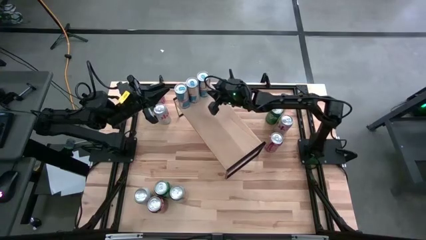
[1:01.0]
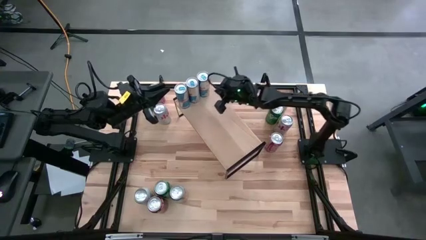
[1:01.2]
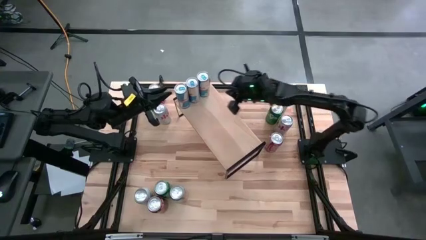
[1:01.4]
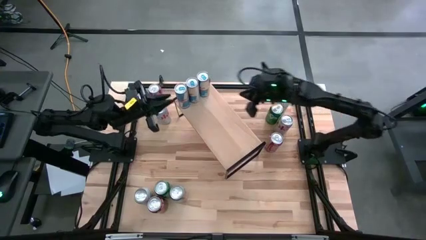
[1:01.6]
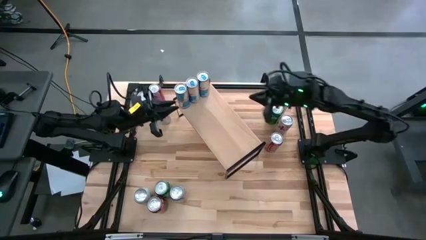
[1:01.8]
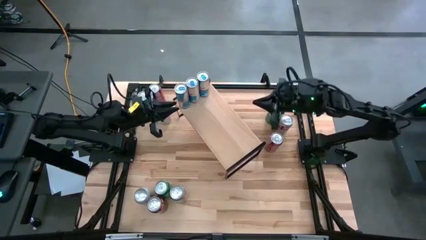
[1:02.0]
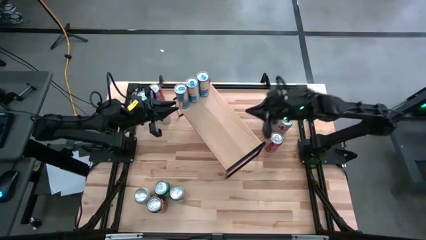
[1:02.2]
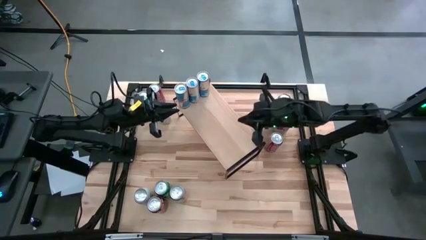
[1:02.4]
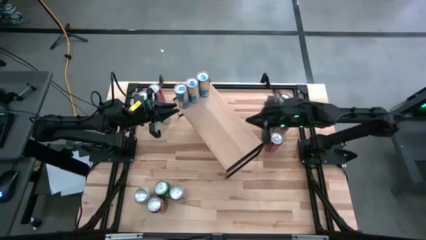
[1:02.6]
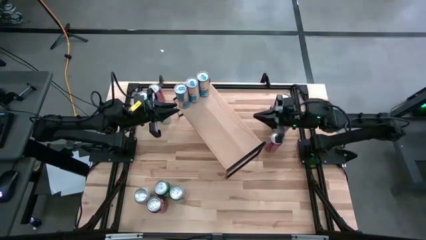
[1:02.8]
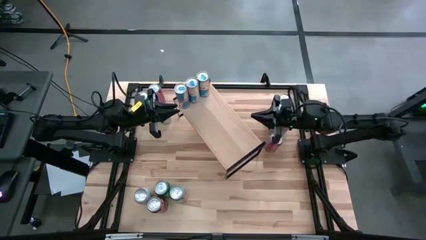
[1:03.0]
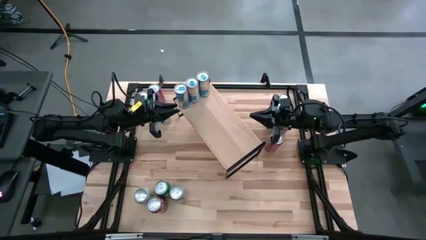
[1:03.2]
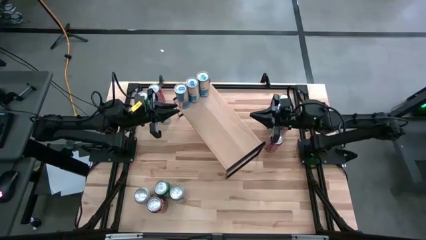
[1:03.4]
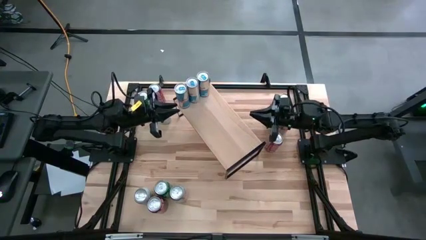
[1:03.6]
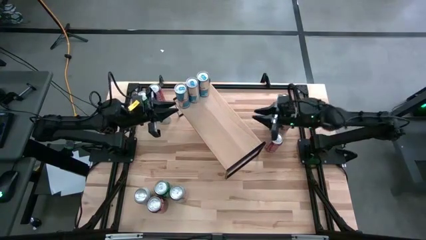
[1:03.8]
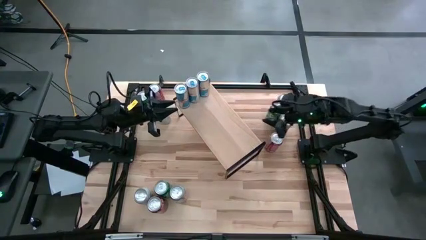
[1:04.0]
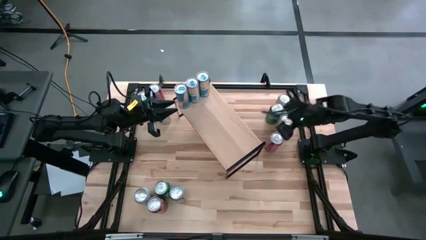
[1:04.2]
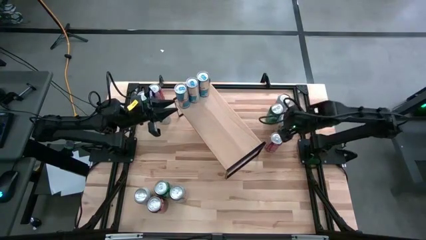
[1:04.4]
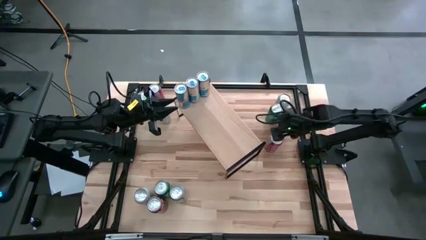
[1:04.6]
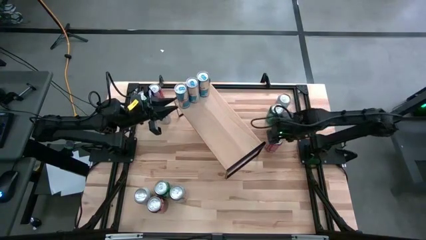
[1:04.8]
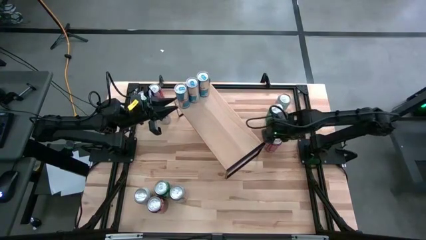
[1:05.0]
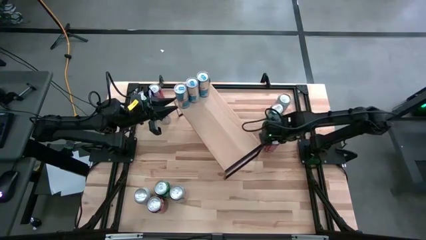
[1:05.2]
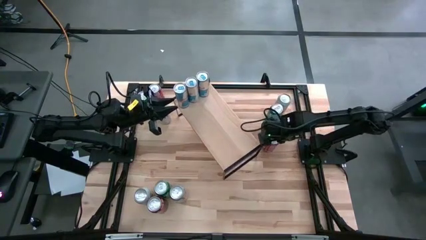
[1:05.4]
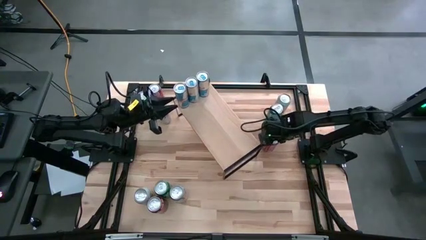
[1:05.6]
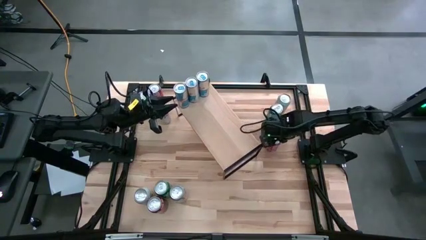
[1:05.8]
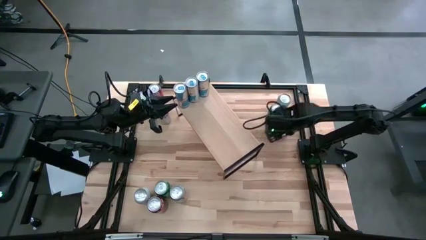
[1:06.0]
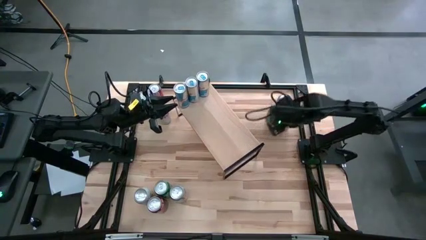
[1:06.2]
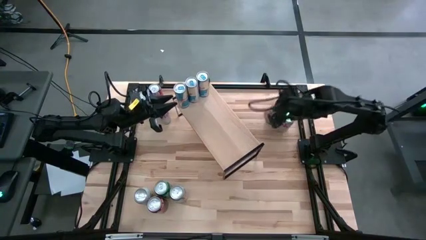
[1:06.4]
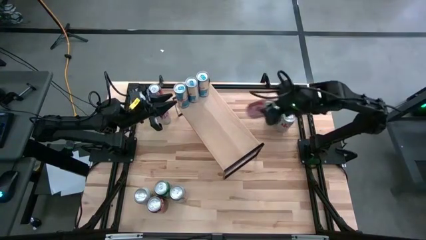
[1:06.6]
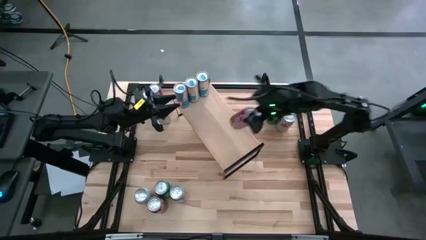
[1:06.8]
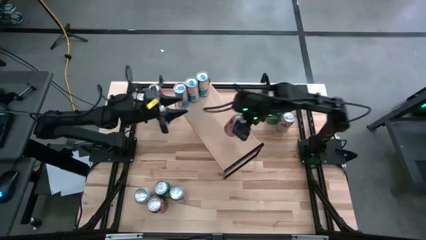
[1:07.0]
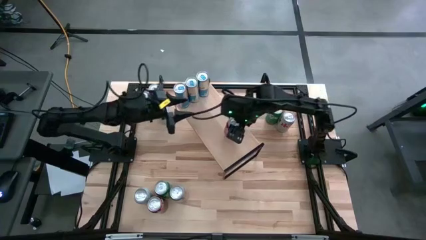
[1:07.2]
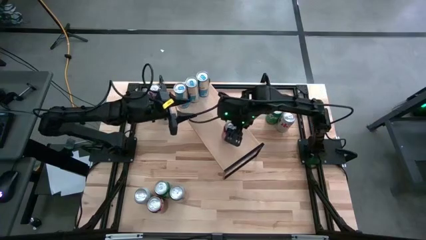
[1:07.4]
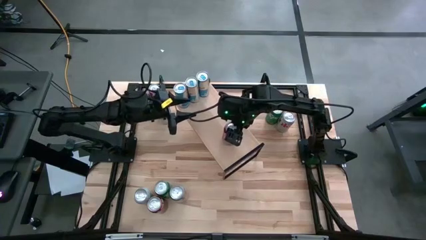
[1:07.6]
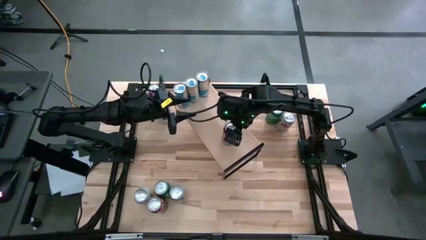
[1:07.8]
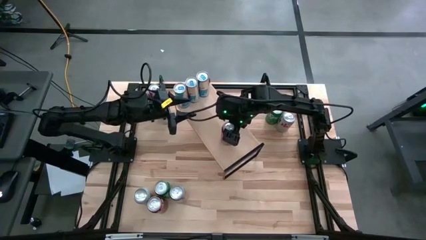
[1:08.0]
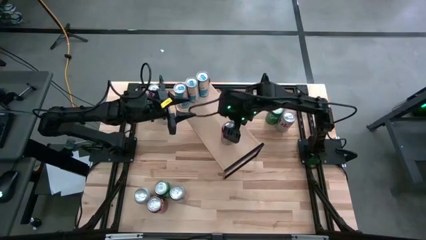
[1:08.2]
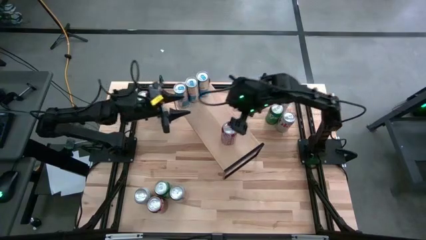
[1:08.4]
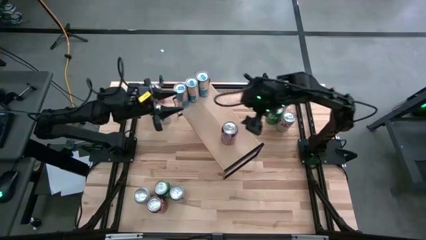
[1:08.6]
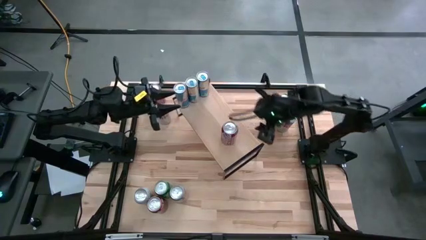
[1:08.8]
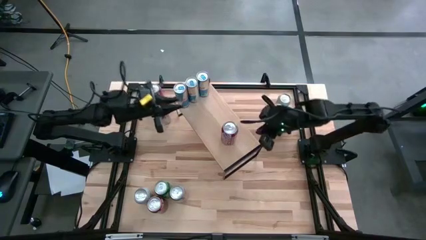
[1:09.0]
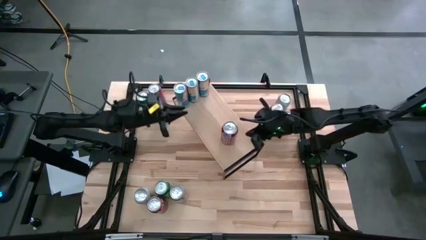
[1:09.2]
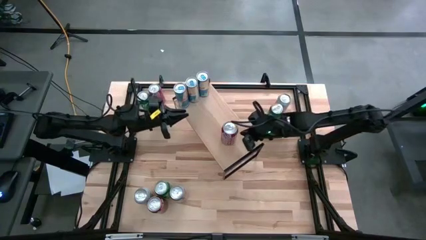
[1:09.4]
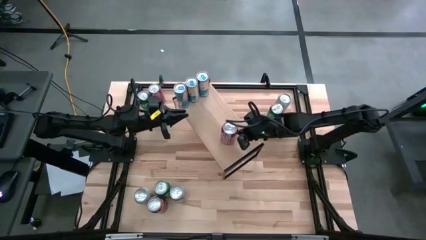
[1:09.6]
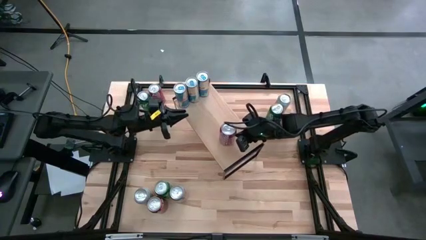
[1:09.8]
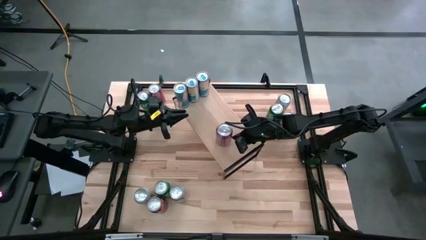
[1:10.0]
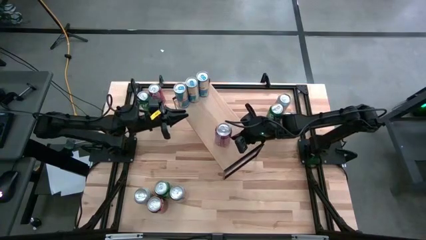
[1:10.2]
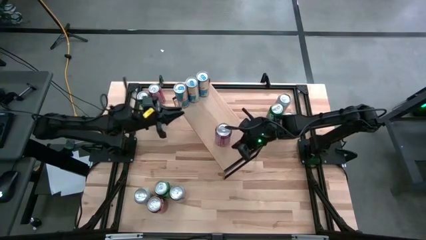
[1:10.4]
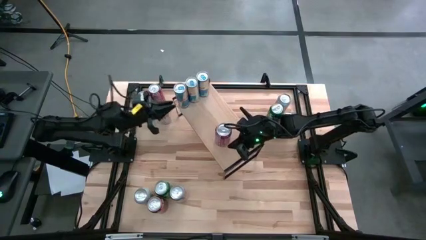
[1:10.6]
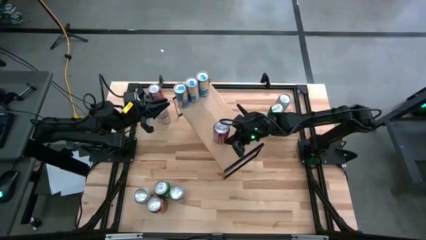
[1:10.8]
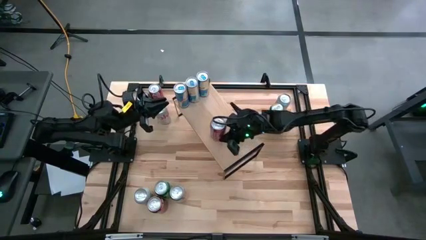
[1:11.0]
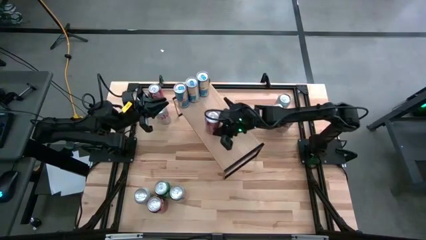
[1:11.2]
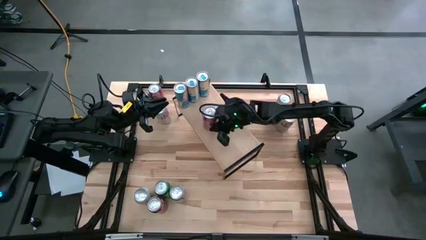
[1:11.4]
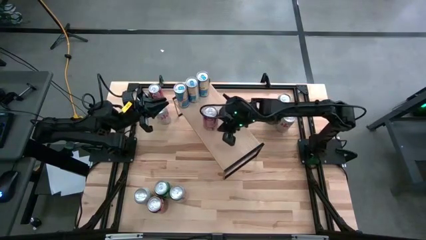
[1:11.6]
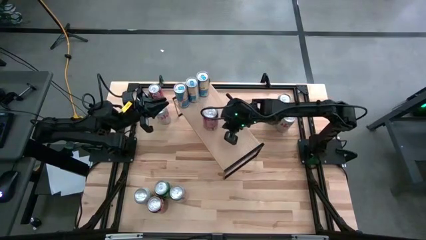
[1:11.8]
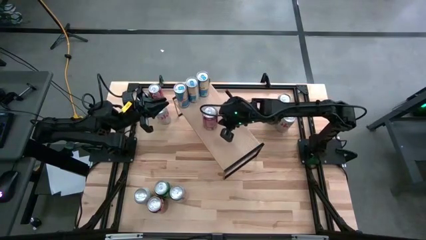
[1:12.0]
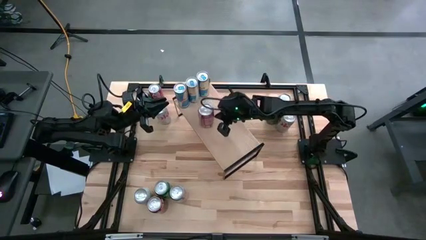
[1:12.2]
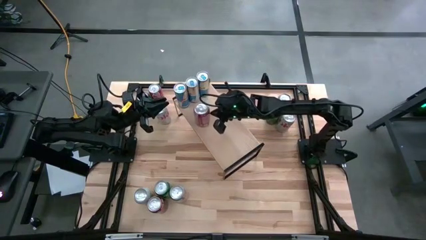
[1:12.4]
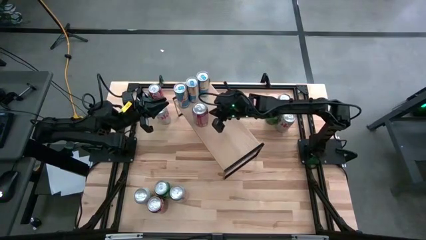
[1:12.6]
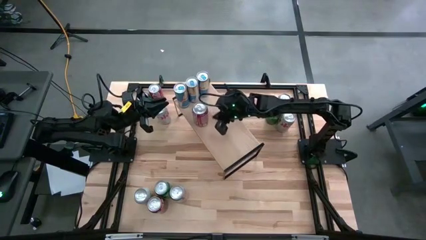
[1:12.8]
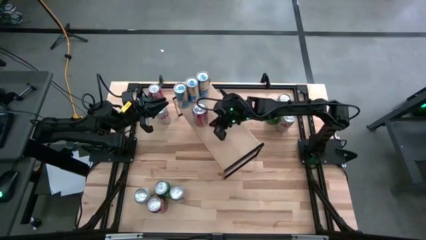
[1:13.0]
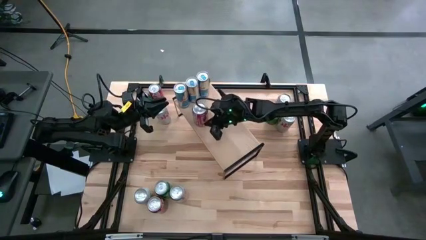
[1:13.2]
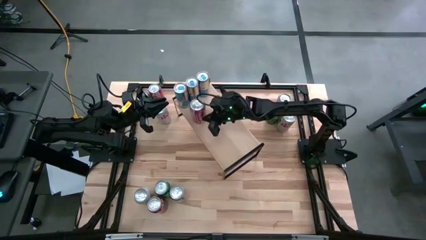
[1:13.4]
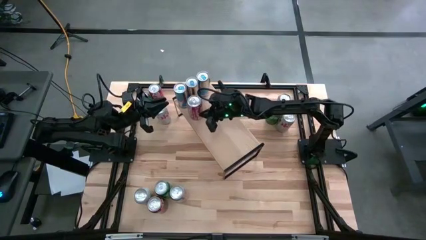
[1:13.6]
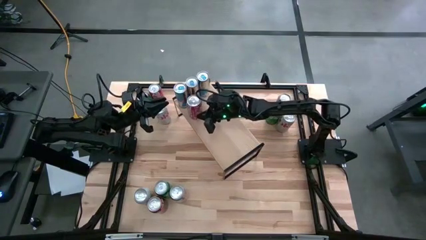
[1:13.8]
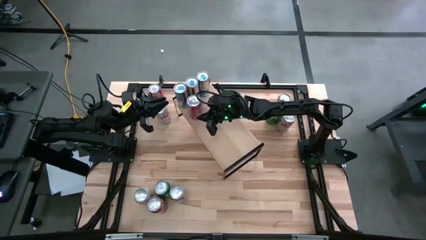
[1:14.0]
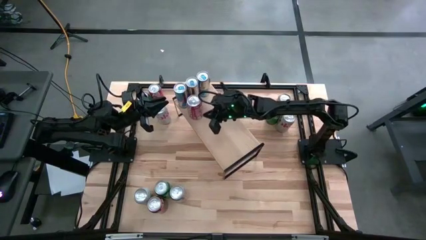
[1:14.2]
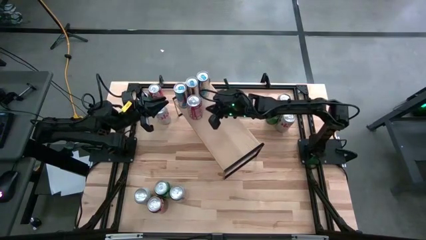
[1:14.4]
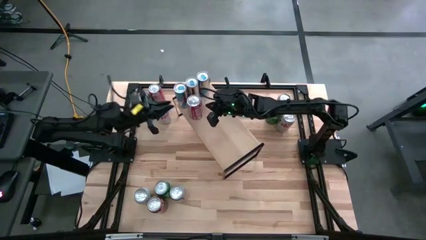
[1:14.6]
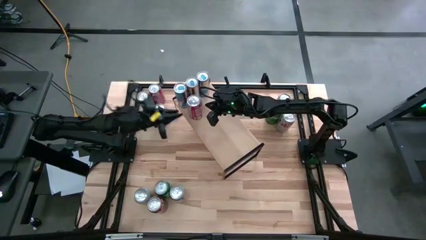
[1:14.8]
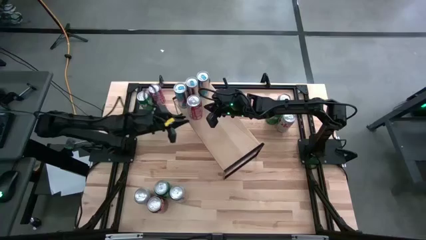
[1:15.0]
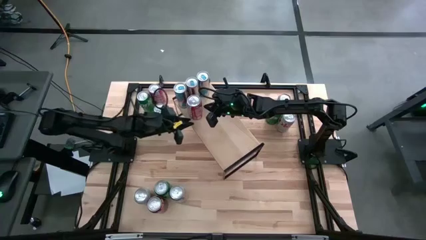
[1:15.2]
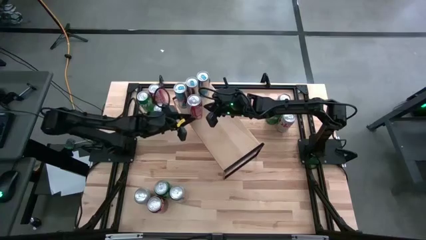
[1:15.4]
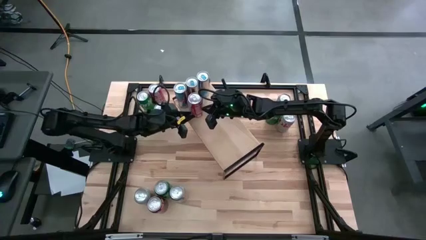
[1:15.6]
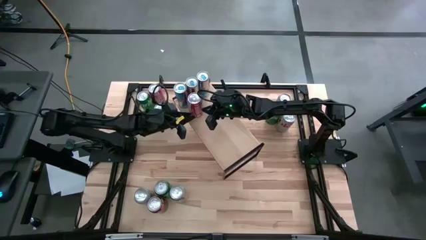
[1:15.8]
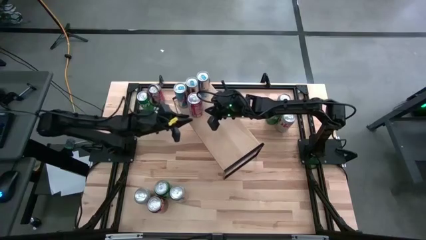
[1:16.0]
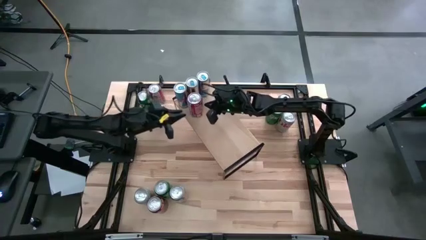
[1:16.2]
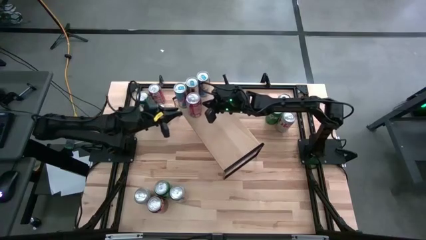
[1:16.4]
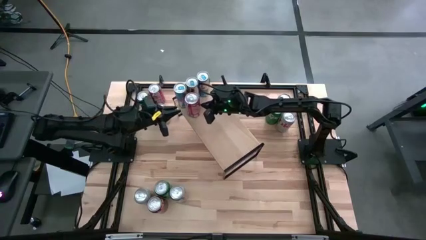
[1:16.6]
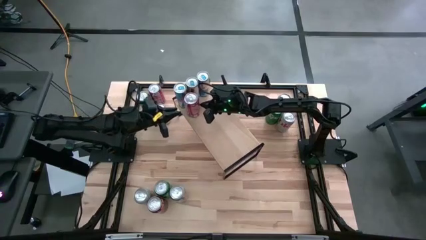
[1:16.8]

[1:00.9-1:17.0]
Task: Place canned beverage on shelf
Put the middle right red soda can on the shelf
